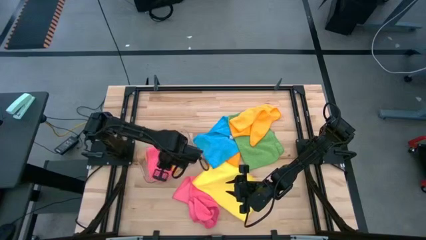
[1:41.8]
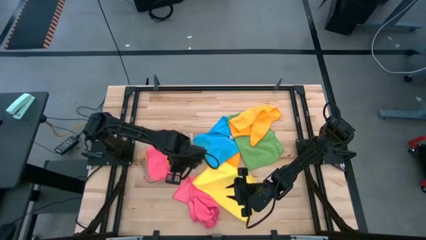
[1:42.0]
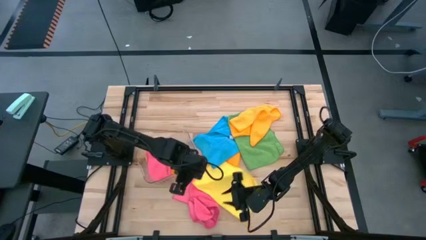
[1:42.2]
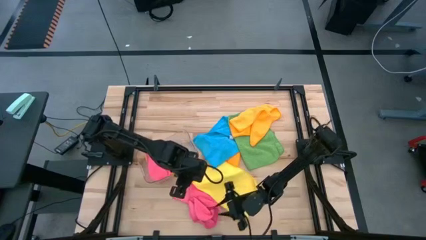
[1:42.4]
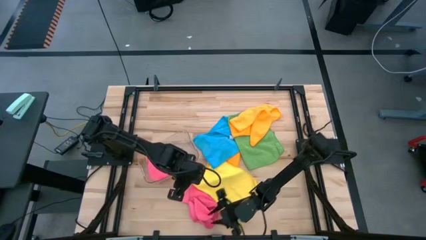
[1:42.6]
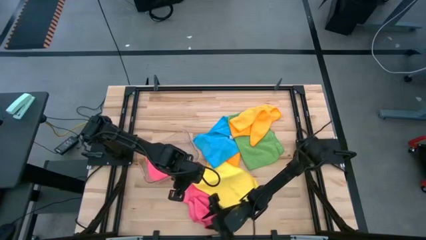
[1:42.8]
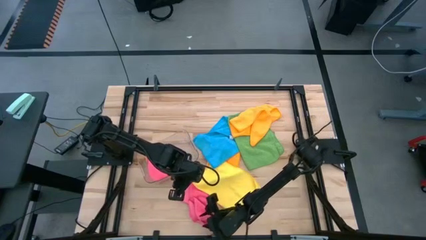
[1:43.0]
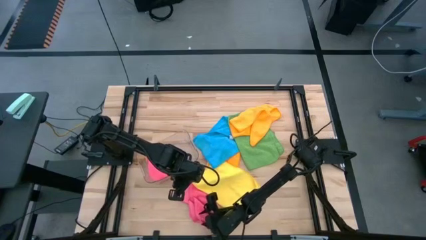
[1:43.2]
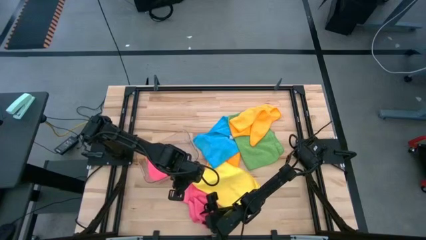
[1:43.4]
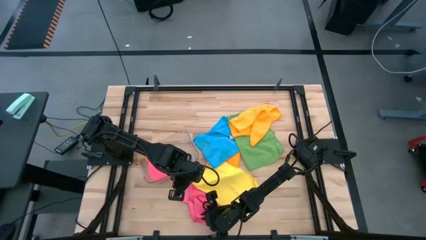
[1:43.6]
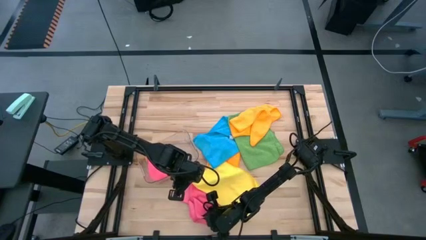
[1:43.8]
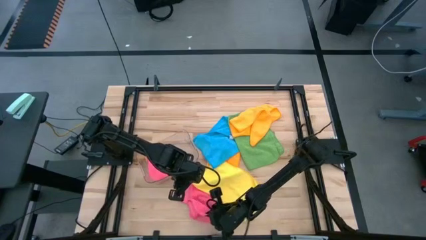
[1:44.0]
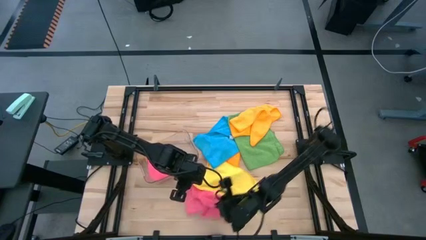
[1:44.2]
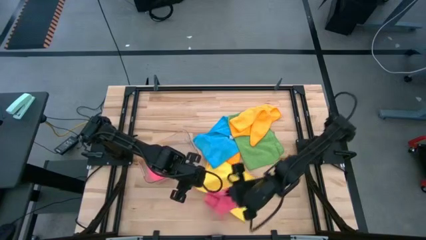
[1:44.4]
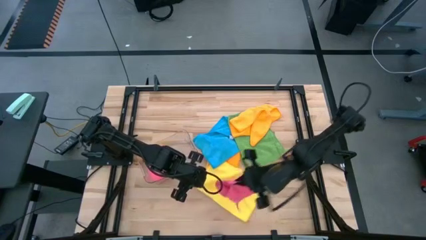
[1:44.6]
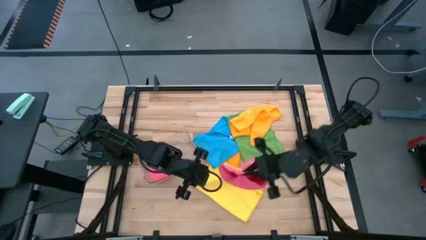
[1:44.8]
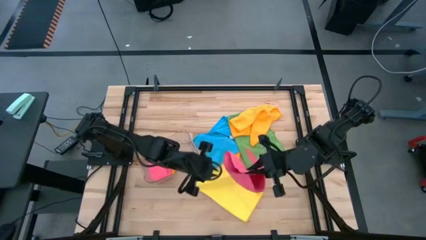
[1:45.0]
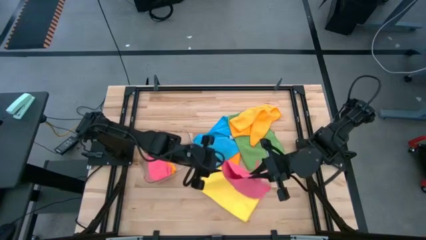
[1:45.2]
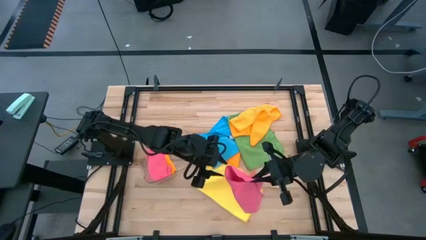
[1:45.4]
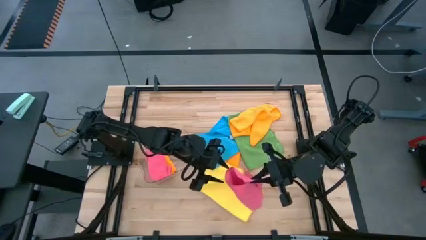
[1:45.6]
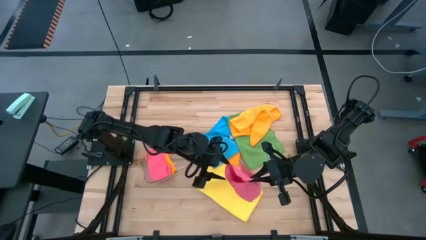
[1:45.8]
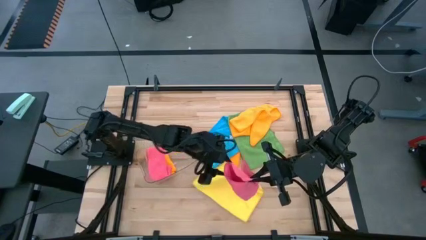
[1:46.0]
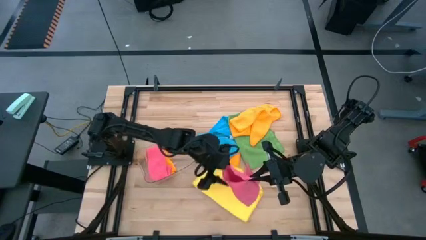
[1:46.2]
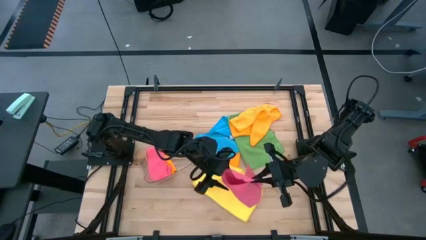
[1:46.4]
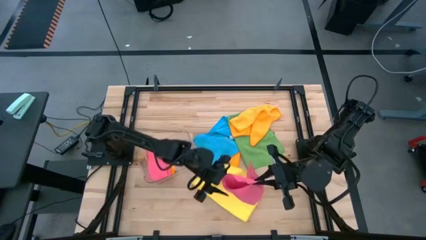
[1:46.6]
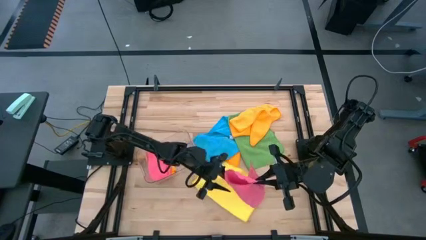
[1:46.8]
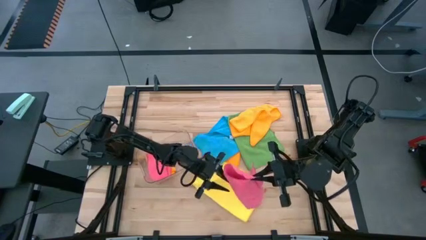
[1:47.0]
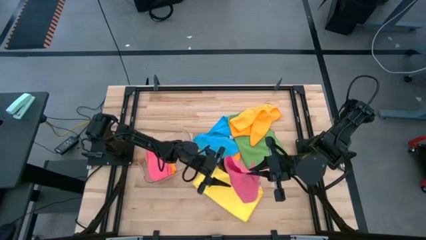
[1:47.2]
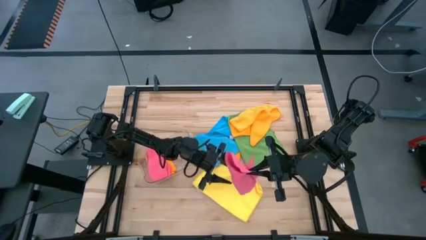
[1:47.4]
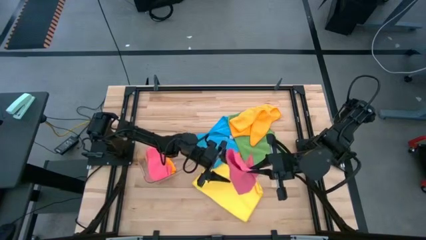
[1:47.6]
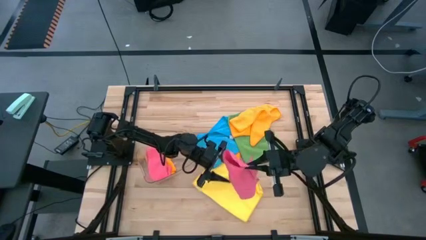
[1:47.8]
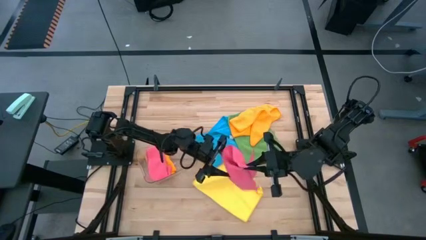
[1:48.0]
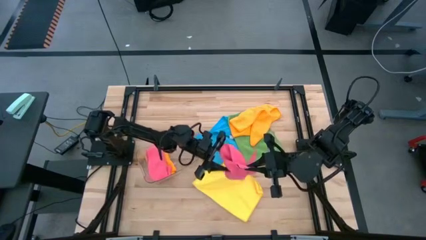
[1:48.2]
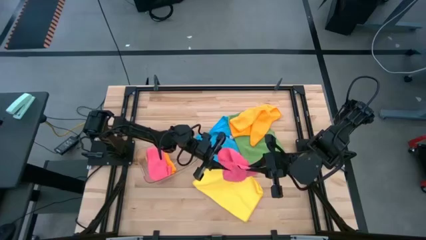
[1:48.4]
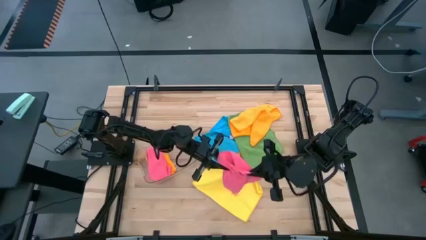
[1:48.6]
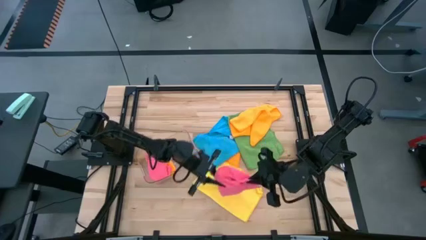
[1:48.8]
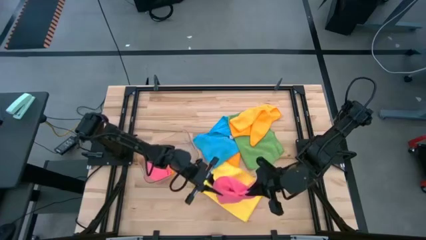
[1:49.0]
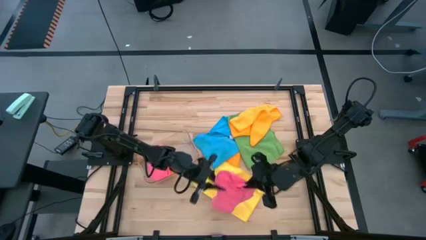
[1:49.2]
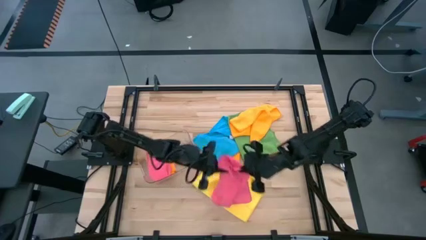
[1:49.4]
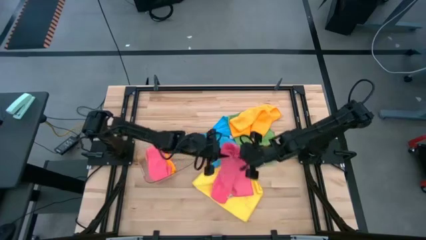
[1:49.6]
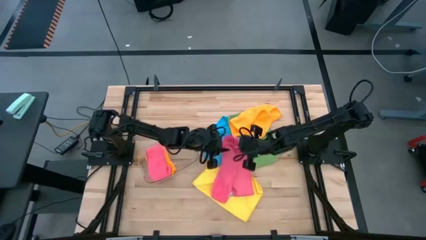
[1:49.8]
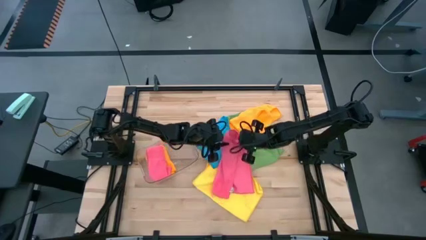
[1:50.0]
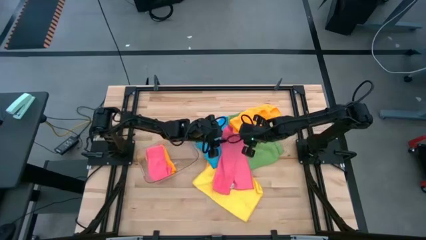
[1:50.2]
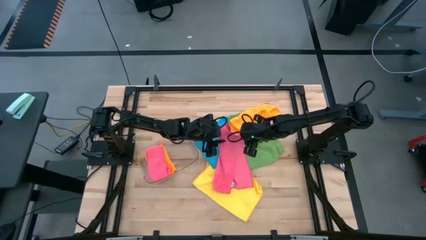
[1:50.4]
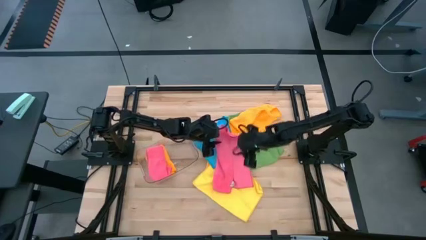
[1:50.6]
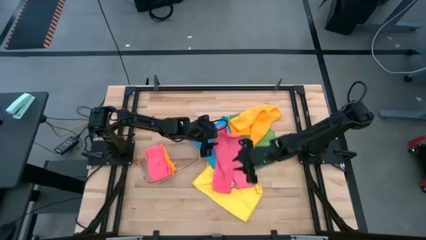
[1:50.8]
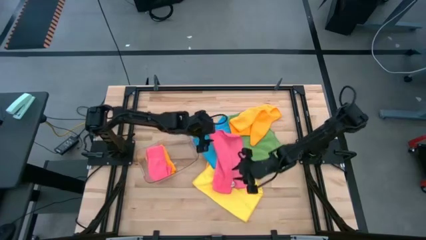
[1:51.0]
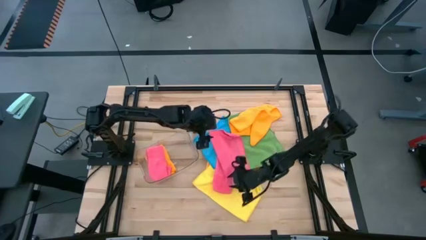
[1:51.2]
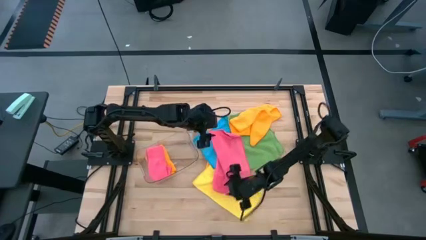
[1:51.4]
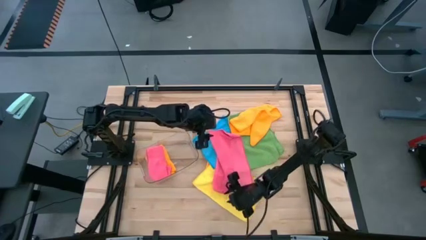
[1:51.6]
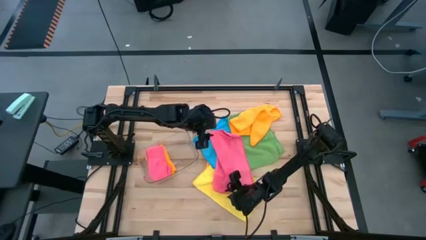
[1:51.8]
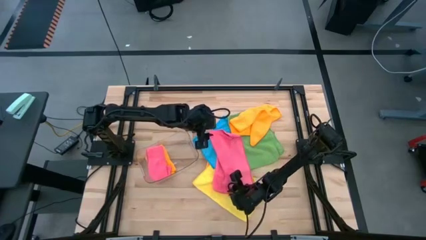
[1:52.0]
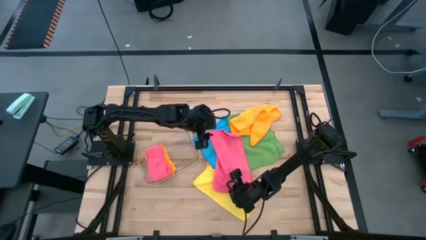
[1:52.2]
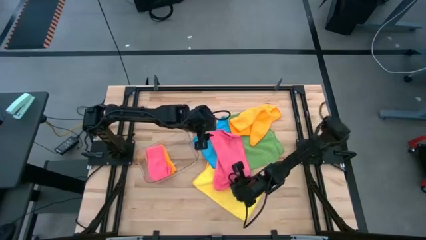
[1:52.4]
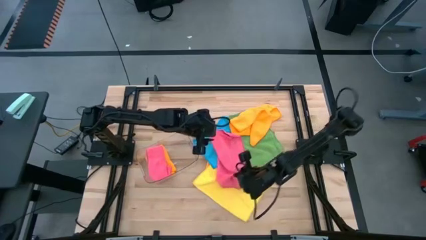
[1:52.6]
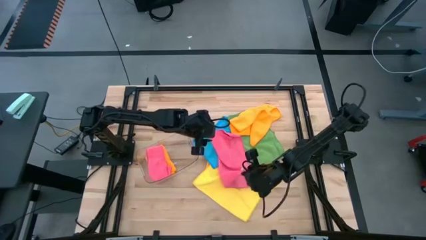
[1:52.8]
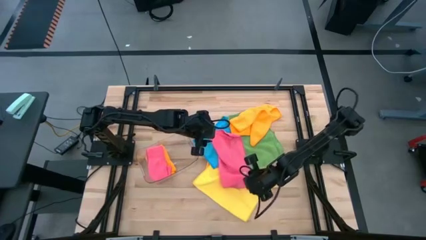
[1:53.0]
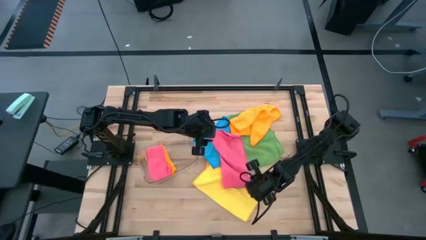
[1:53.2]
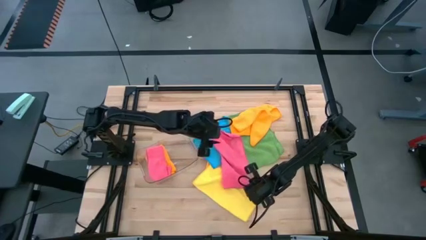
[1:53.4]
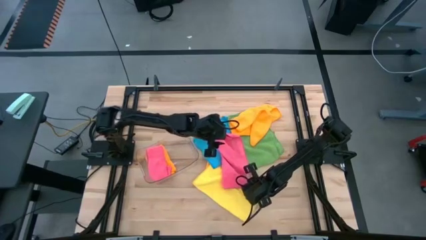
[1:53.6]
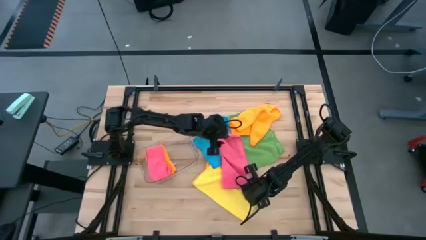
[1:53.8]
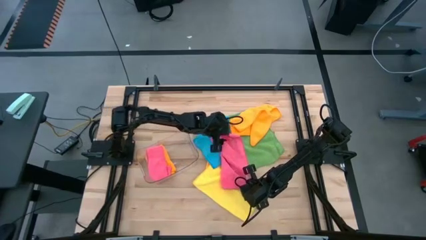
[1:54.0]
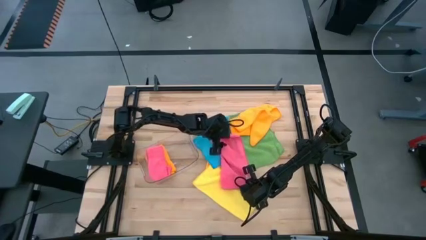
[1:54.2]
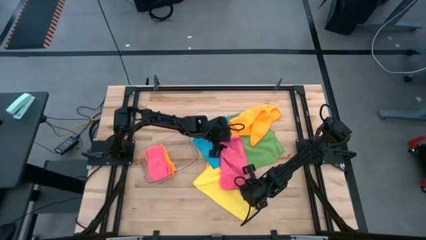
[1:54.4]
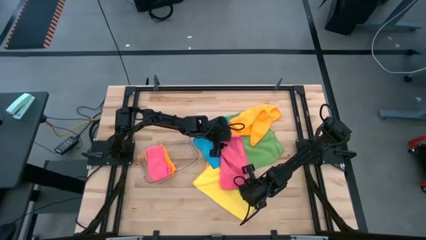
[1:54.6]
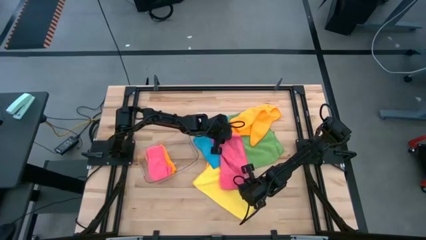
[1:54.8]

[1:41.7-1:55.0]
Task: Fold microfiber towels
Fold the pink microfiber cloth
